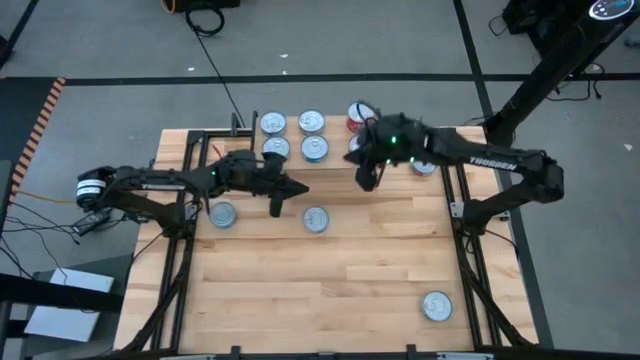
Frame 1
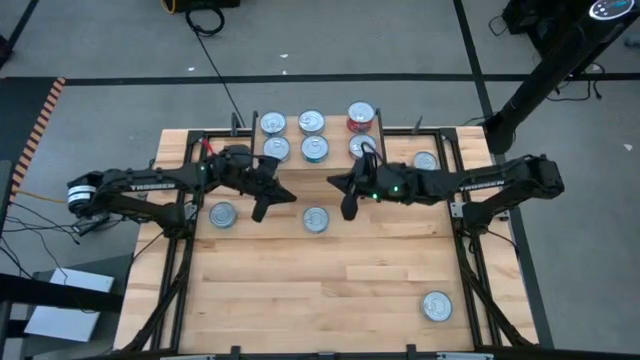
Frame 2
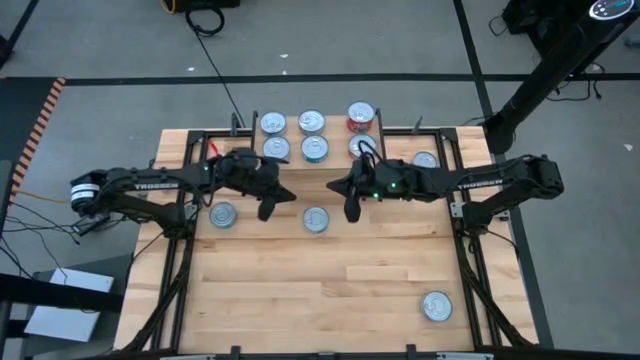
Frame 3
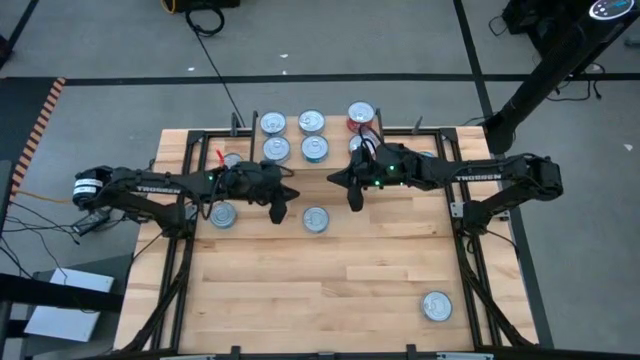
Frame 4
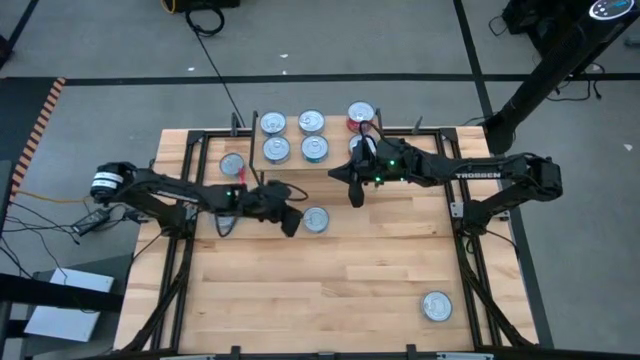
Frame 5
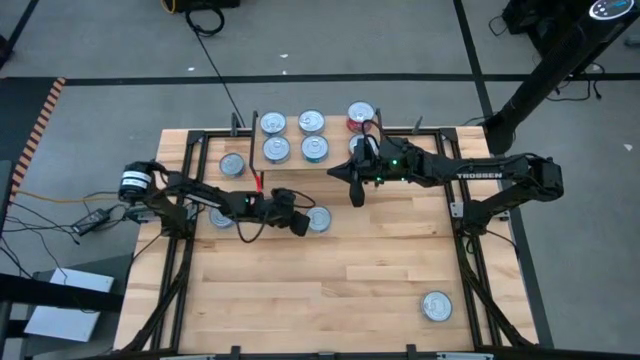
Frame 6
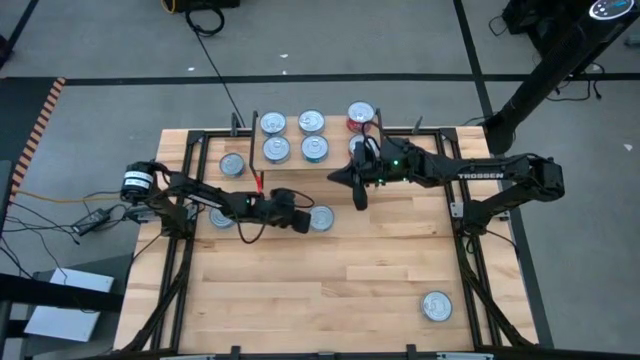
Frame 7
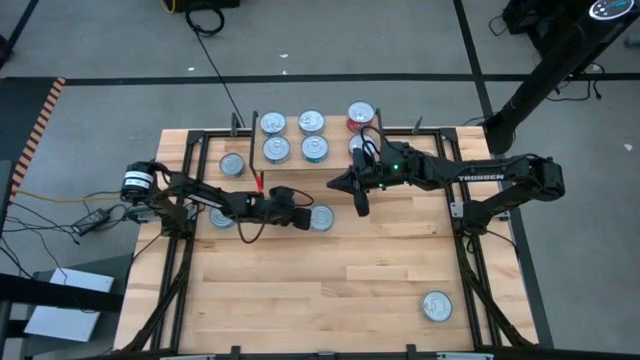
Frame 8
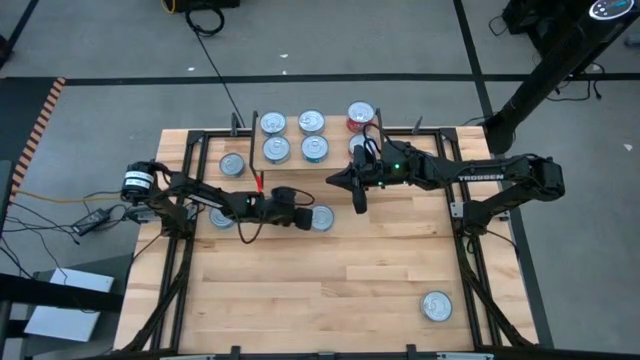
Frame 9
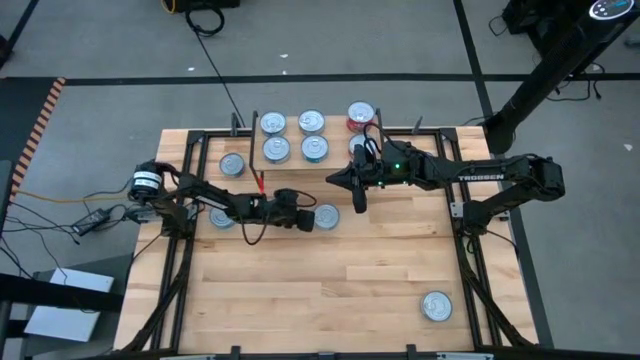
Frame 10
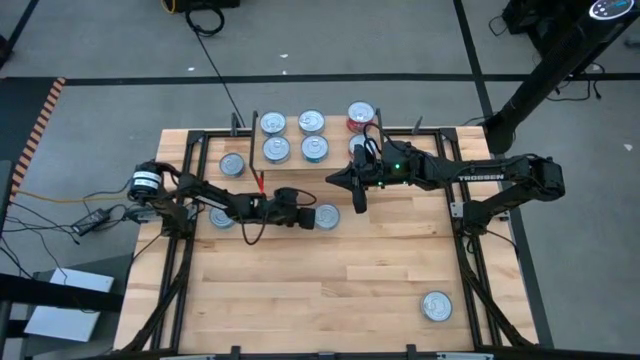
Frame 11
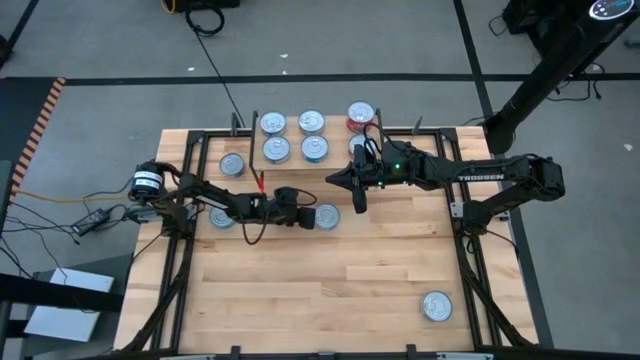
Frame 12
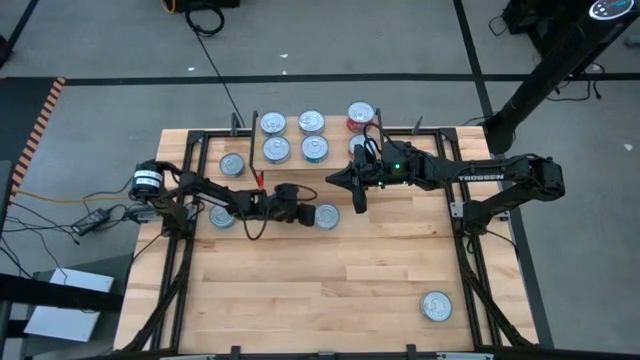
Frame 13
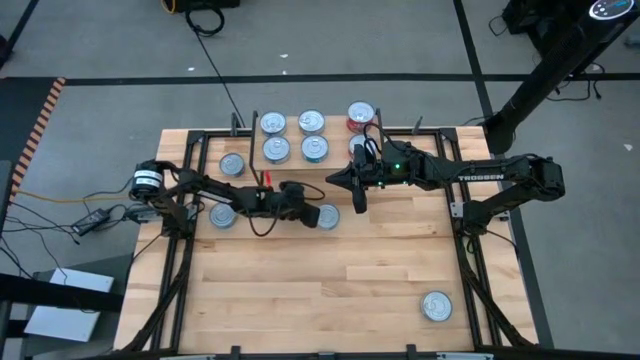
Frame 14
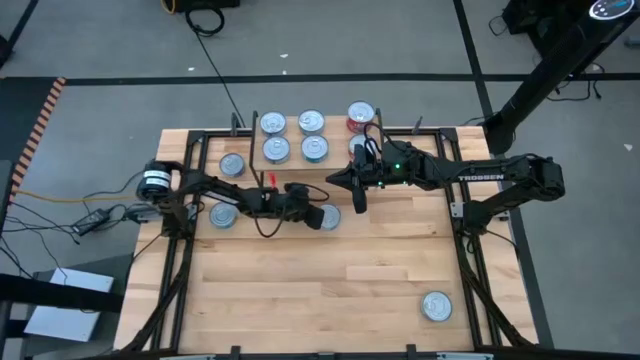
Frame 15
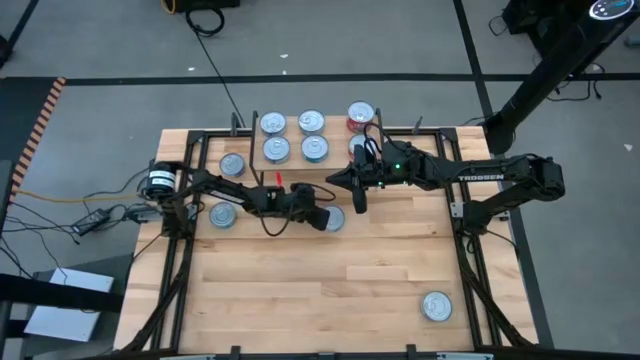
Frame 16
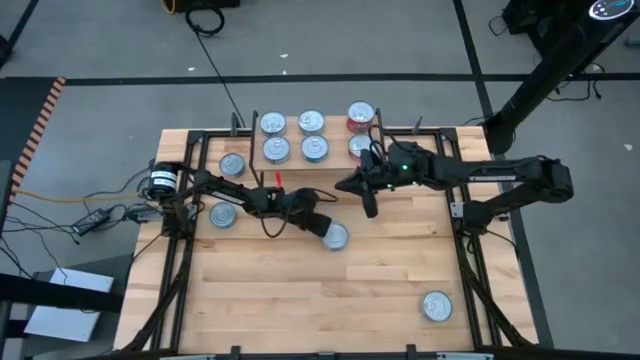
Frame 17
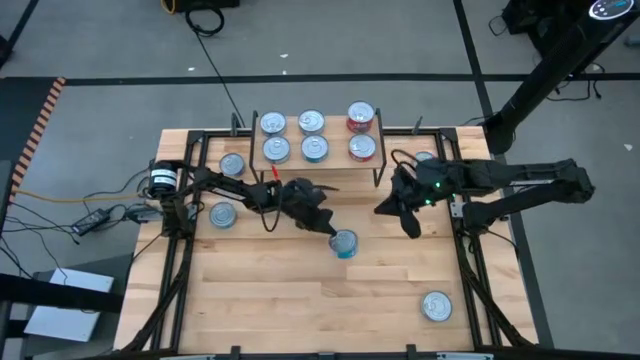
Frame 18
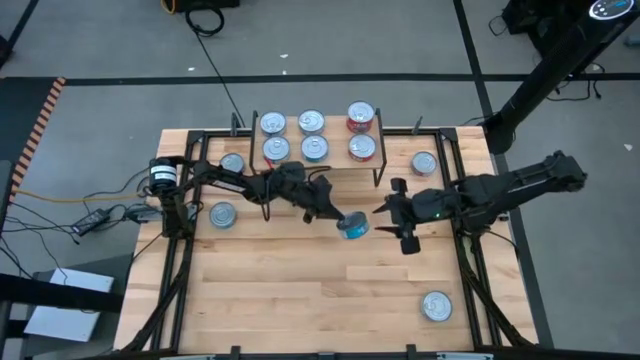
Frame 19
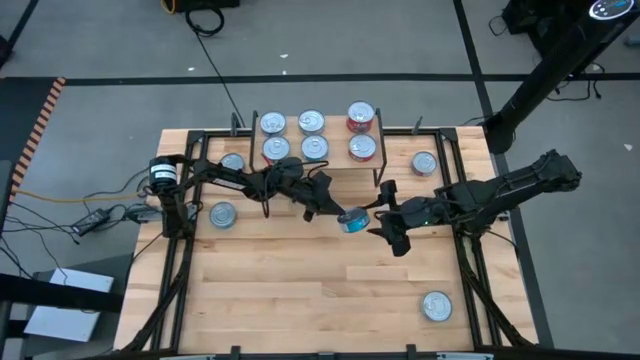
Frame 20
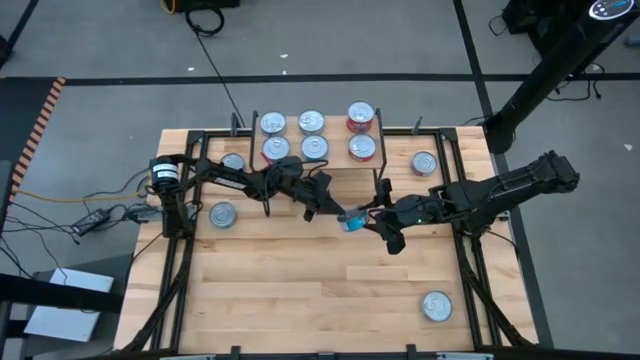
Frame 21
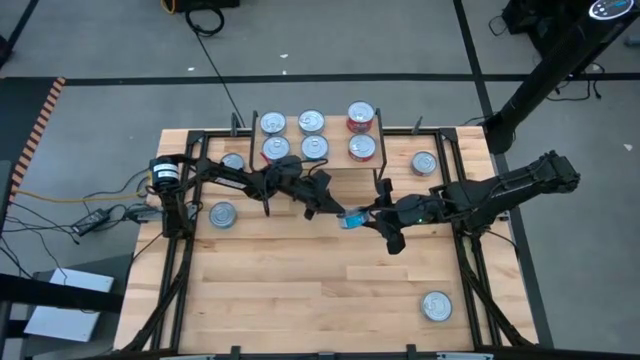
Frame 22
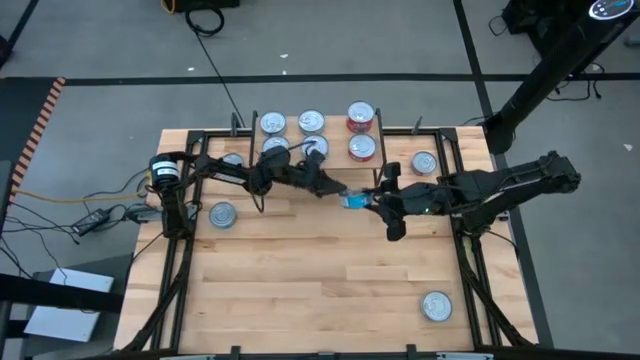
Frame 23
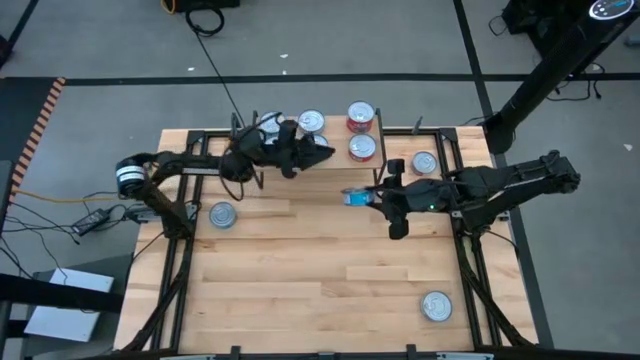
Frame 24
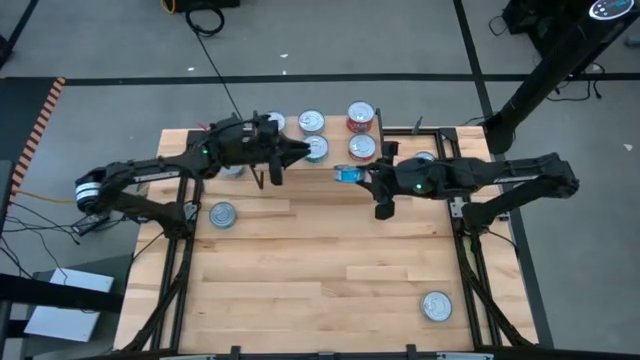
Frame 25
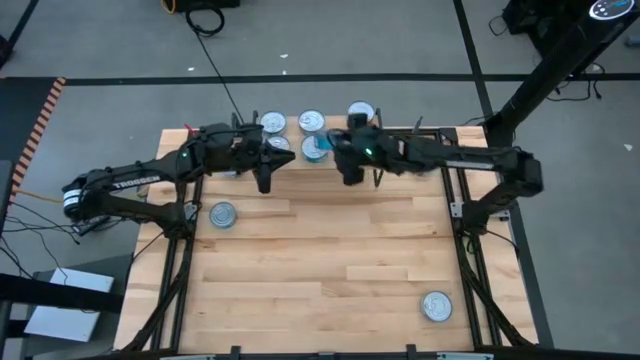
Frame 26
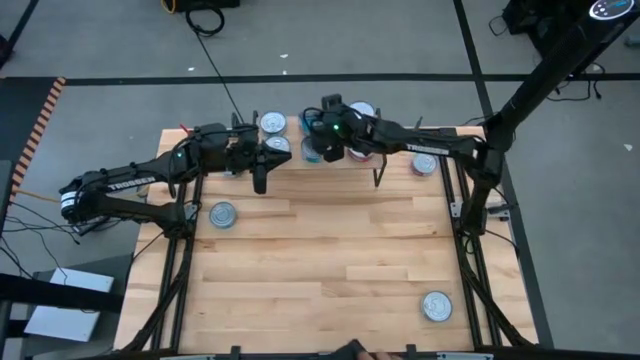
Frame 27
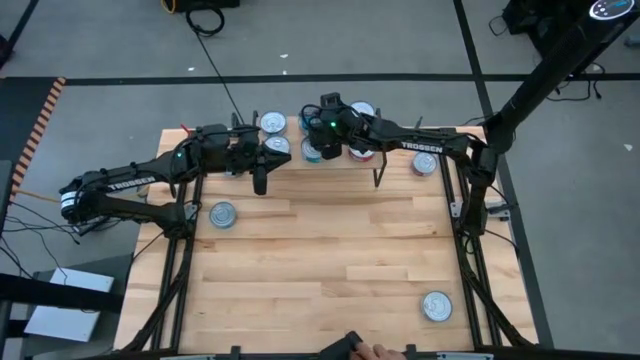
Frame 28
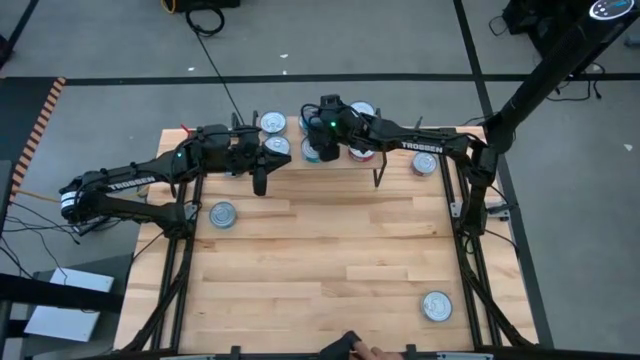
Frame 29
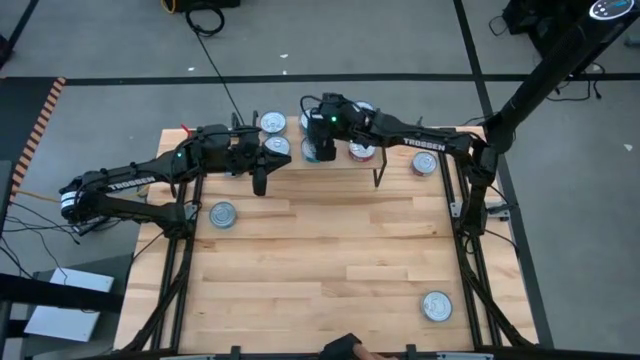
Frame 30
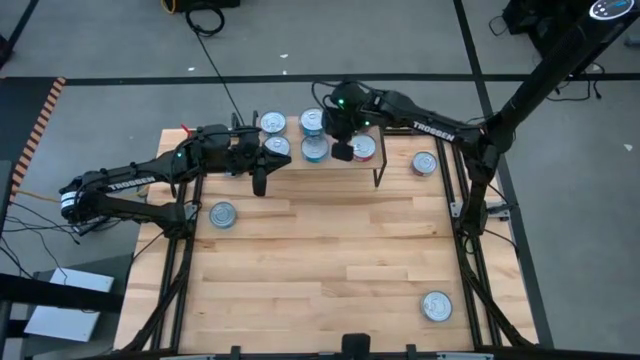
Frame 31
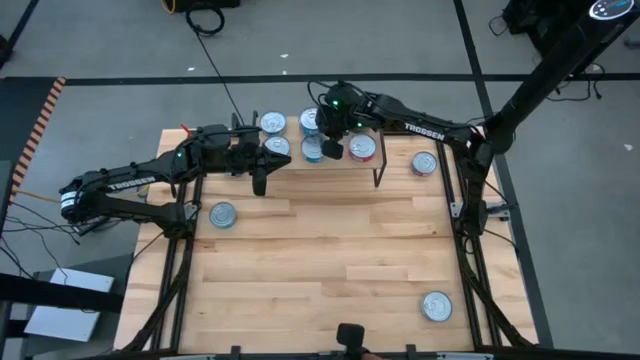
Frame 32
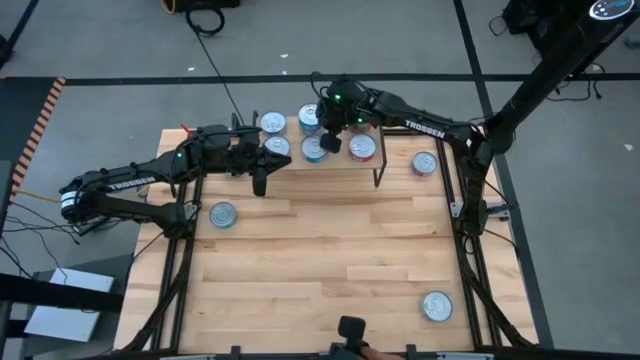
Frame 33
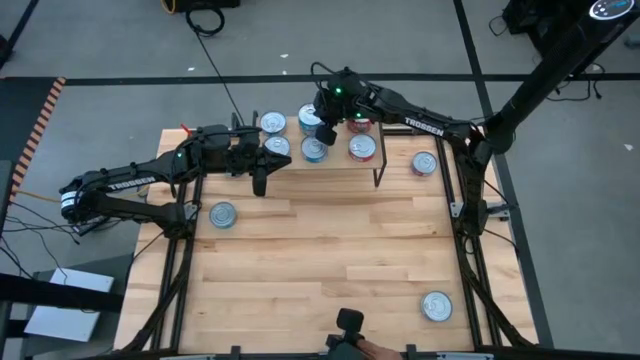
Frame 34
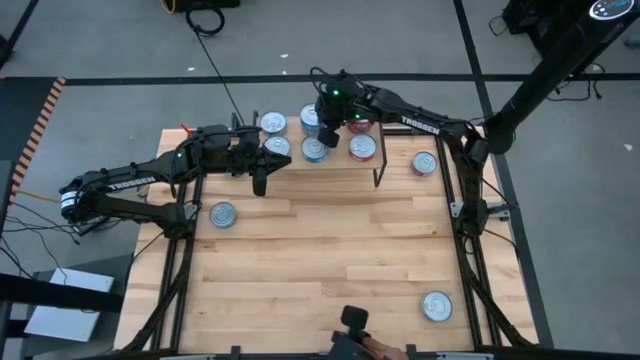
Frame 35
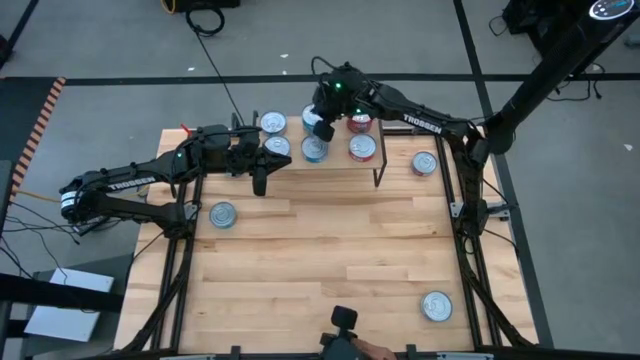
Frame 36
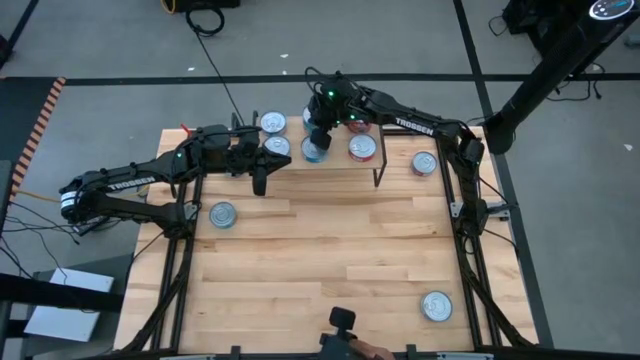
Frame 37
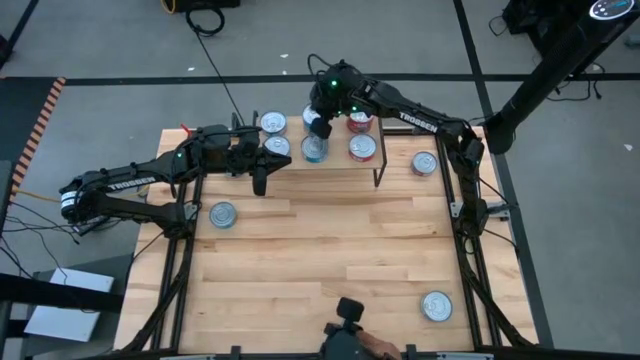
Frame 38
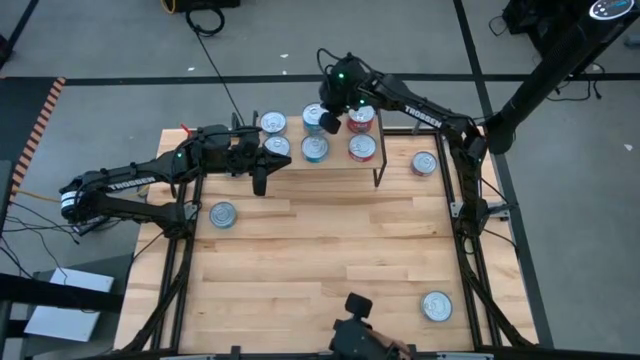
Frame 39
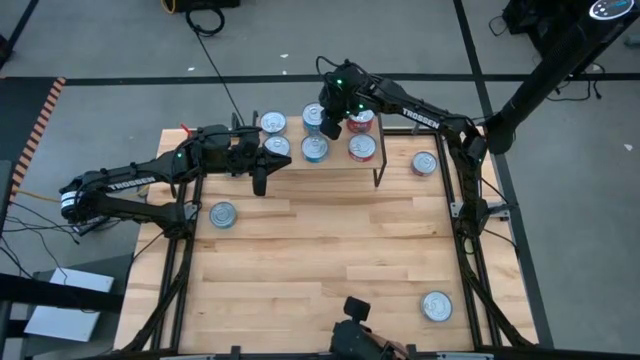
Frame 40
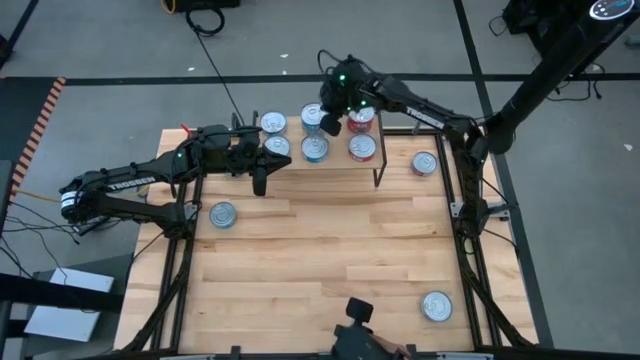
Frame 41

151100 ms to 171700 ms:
Task: Stack canned seafood by type on shelf
Stack the yellow-blue tuna can on top of the other yellow-blue can on the shelf

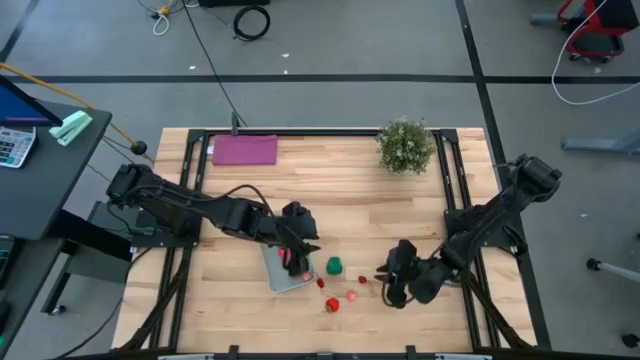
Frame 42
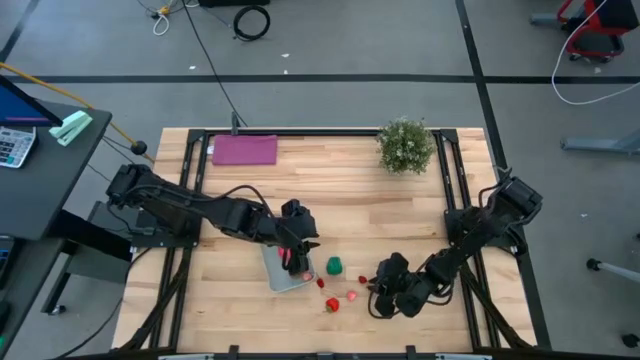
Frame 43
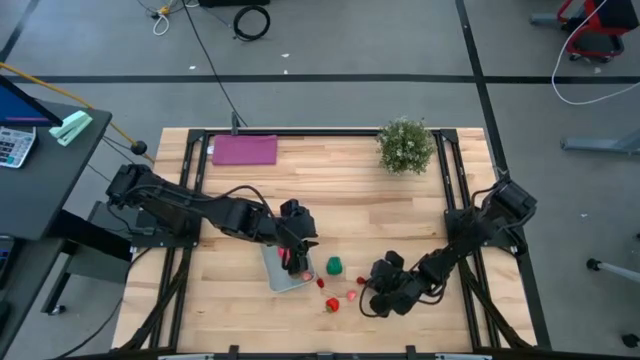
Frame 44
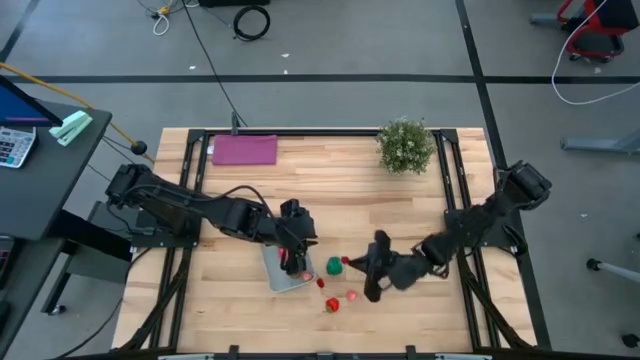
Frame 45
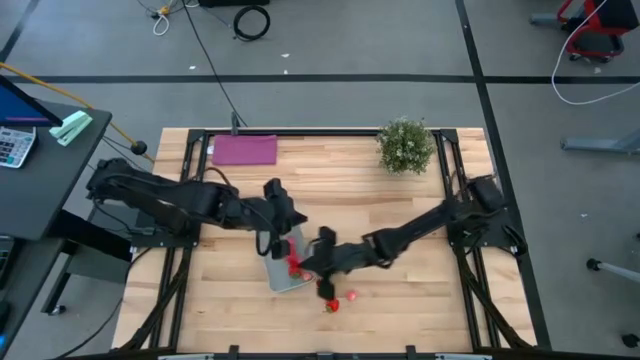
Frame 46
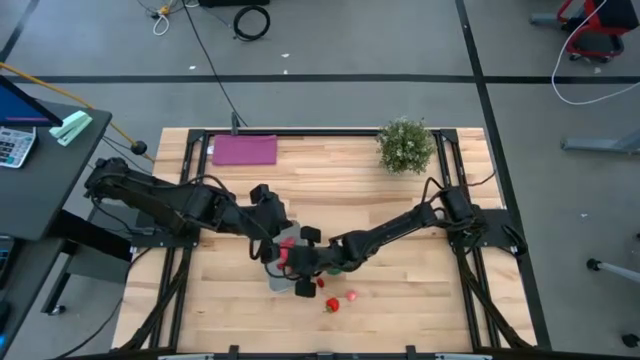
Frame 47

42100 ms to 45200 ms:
Task: Pick and placing Produce into tupperware
Put the red cherry into the gray bin
